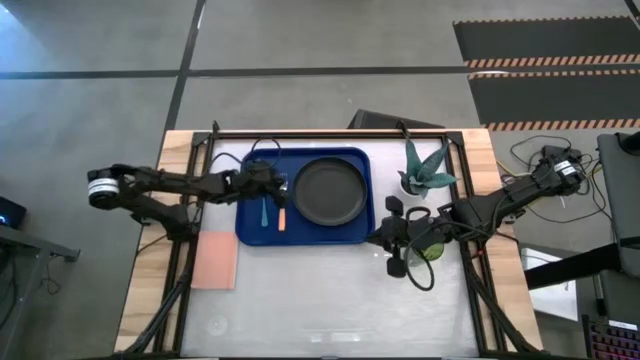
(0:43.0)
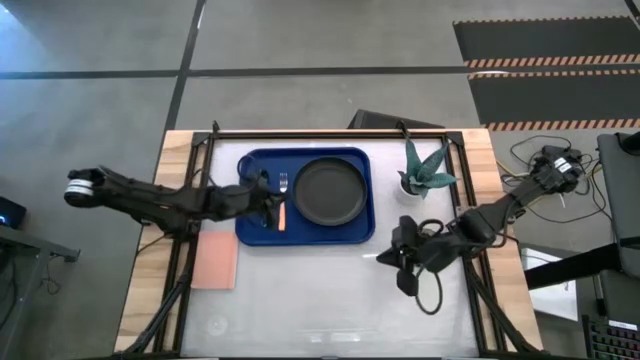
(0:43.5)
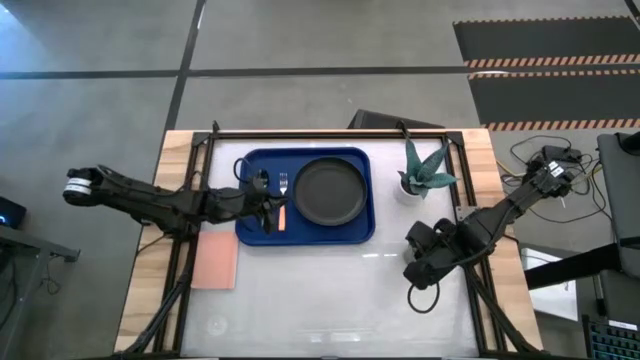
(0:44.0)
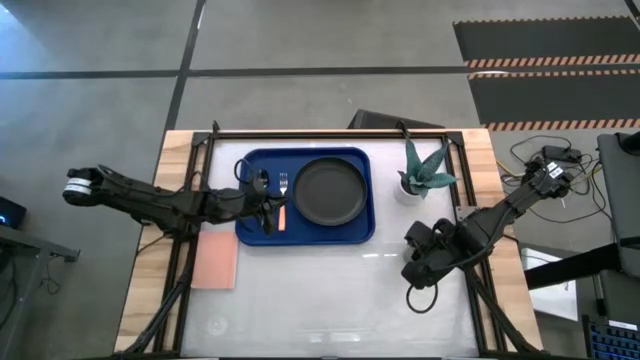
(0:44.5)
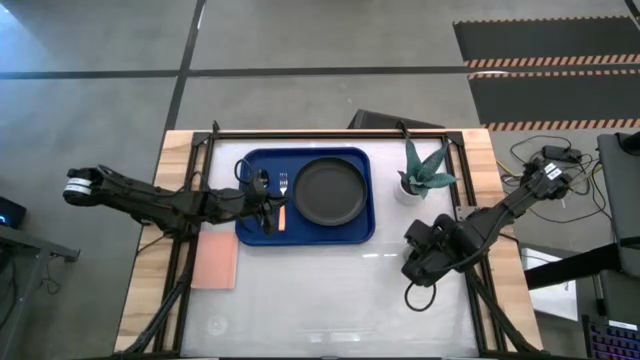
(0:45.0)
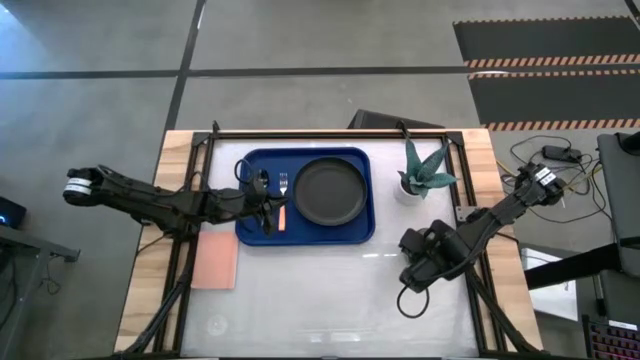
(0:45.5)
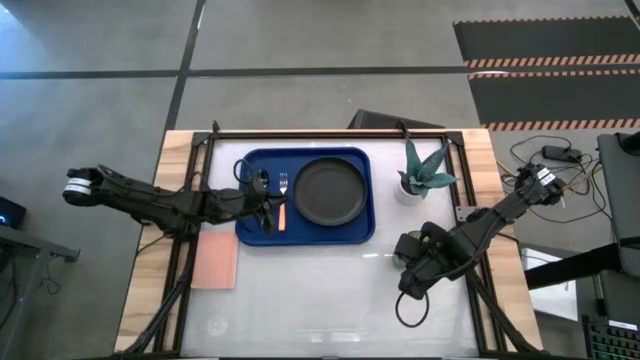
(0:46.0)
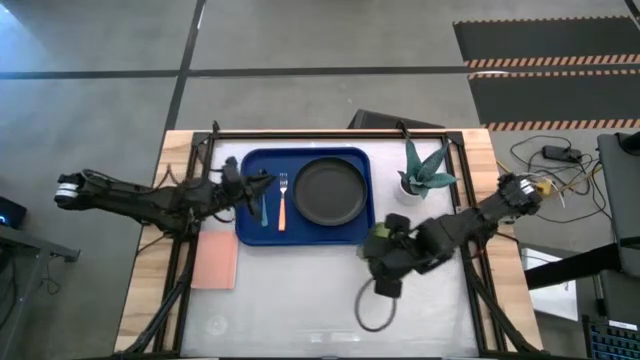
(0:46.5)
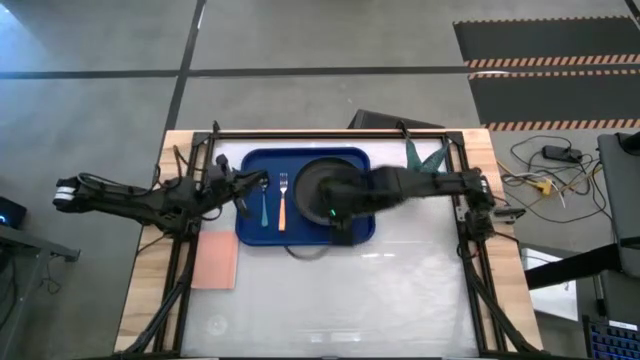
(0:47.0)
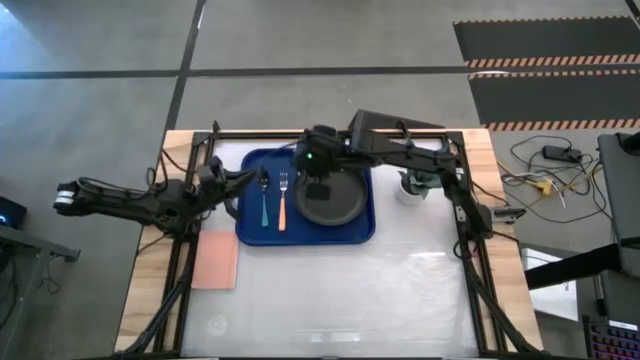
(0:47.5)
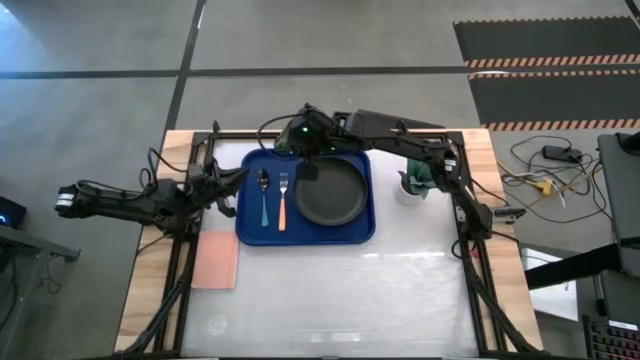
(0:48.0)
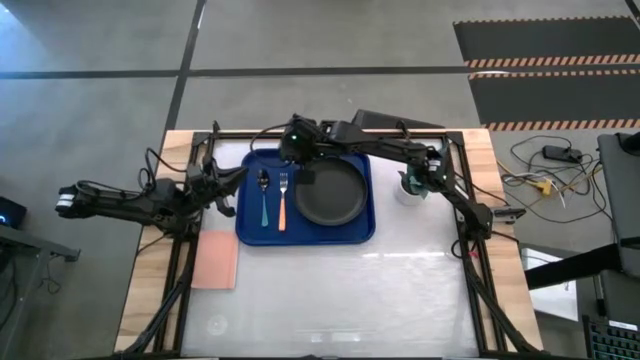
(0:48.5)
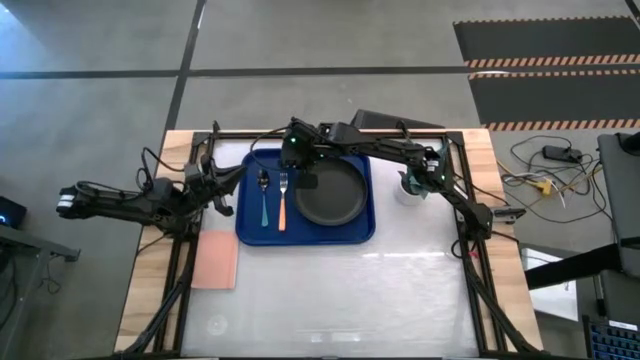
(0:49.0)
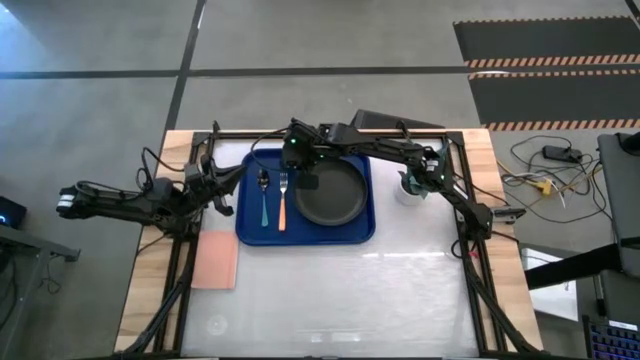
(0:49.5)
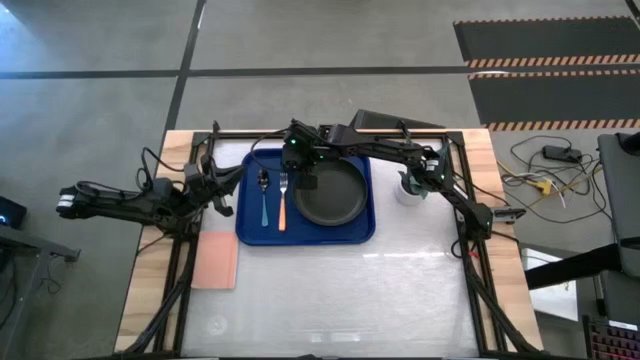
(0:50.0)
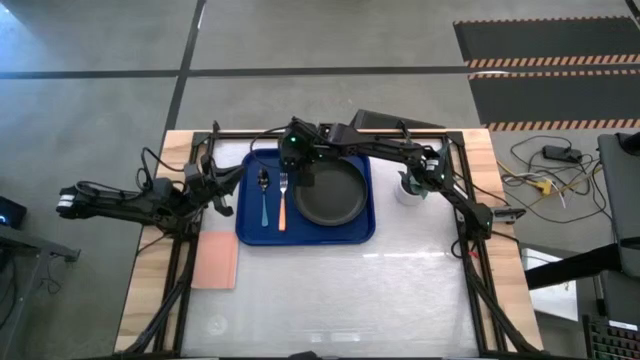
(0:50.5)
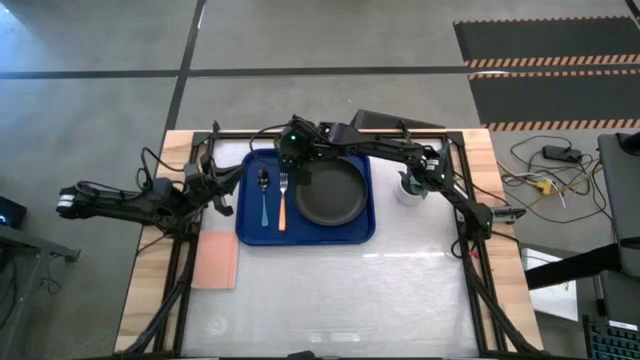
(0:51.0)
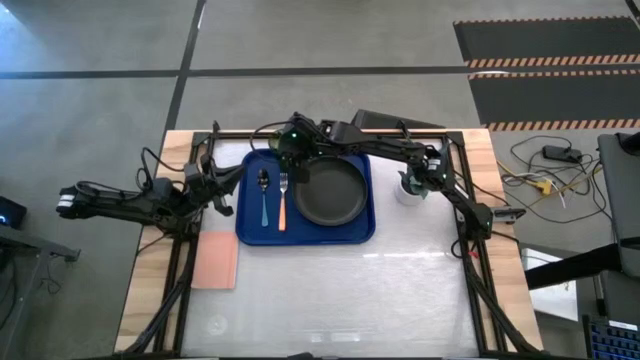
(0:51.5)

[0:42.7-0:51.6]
Task: Pick and place plate/cup/fork/spoon on tray
Put the green cup on the blue serving tray to the top left of the black plate

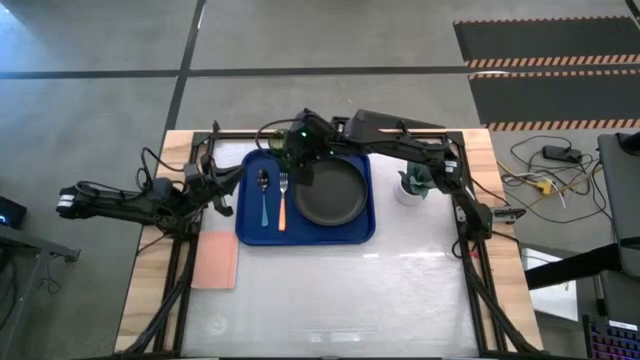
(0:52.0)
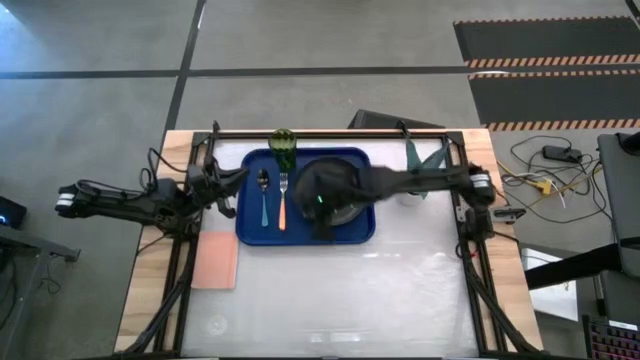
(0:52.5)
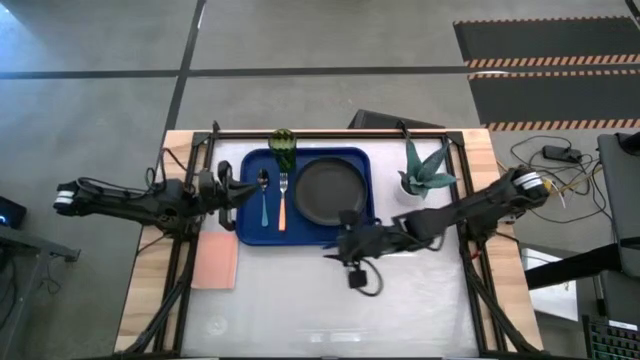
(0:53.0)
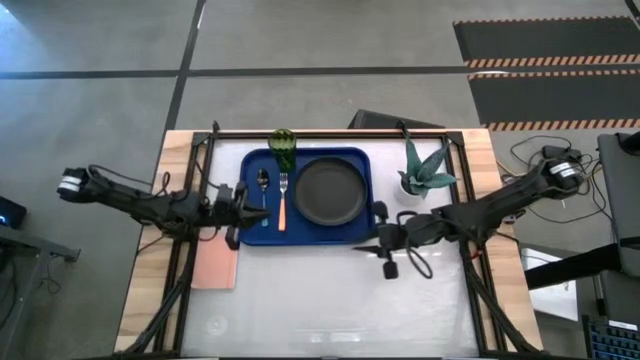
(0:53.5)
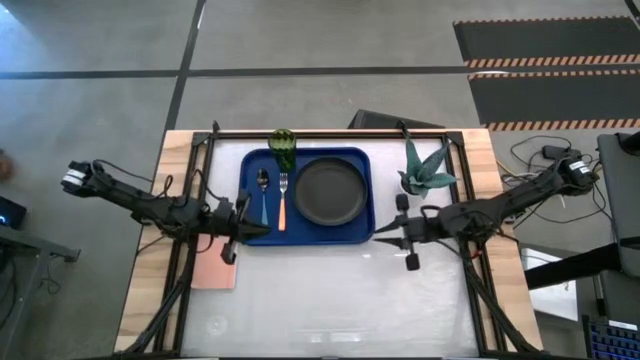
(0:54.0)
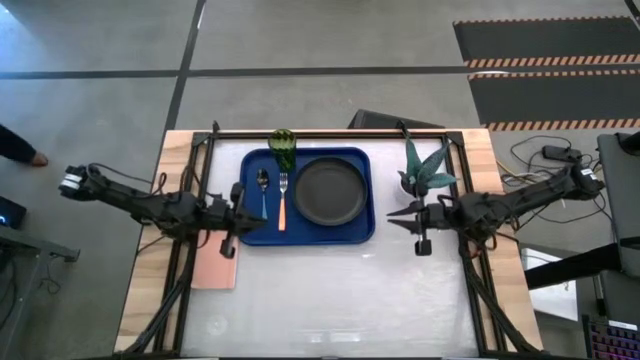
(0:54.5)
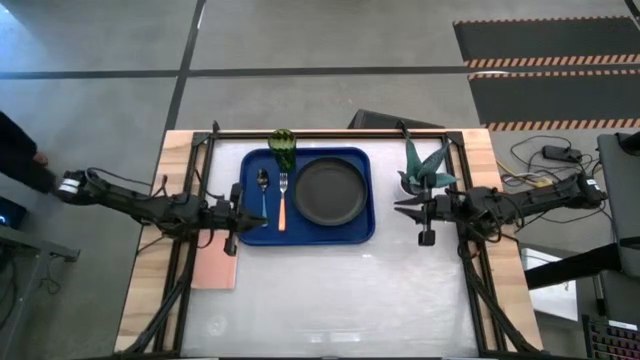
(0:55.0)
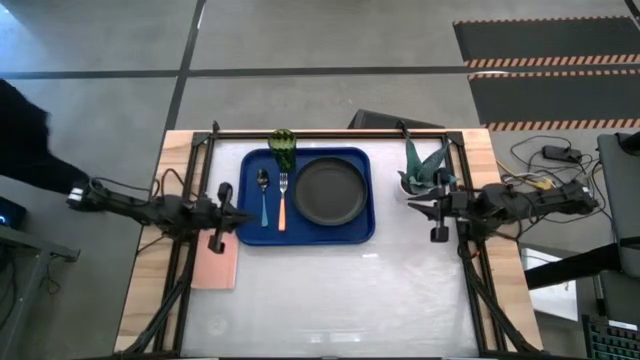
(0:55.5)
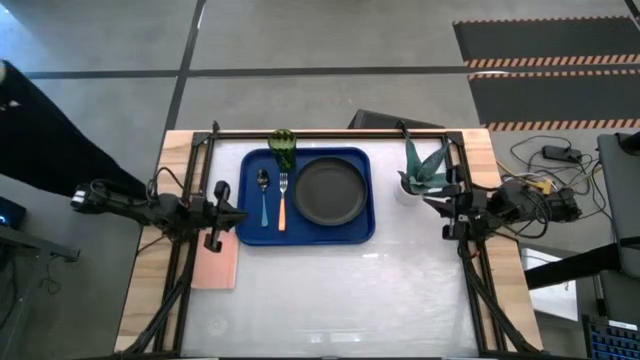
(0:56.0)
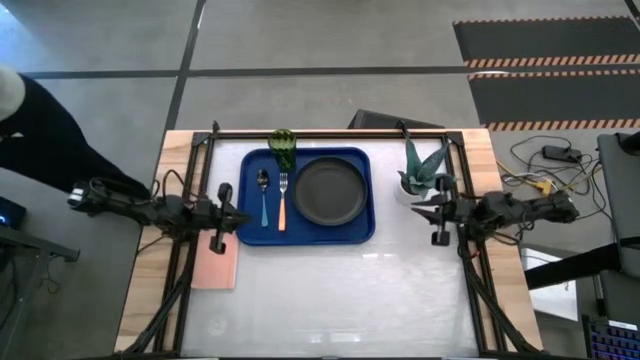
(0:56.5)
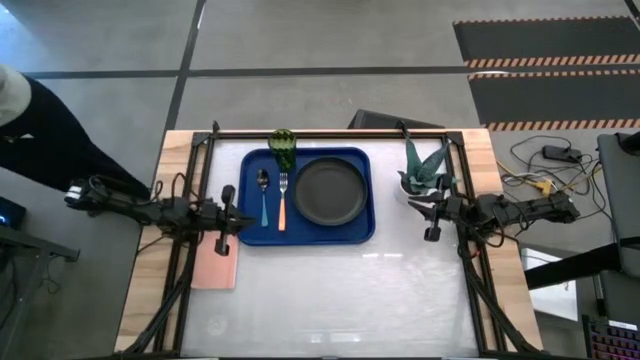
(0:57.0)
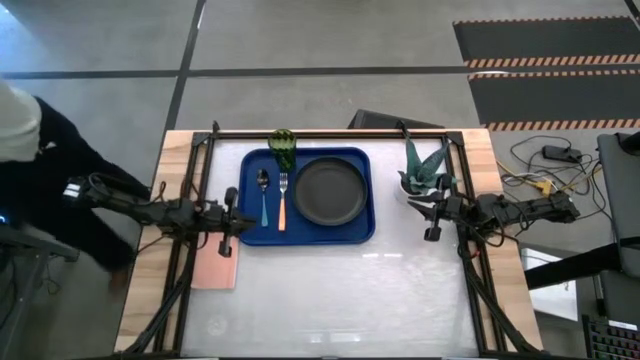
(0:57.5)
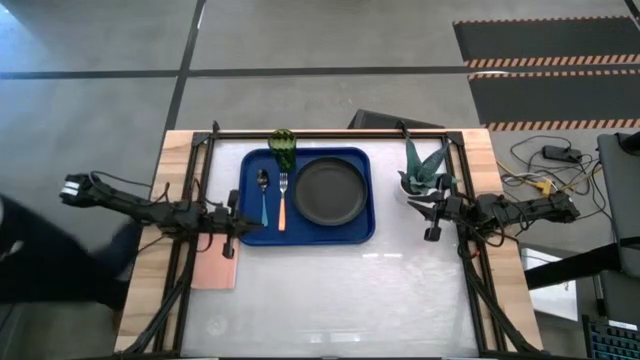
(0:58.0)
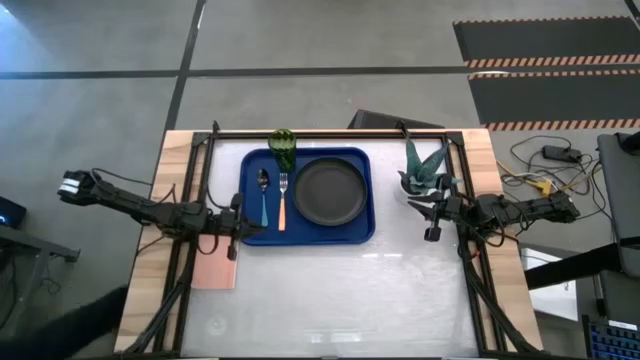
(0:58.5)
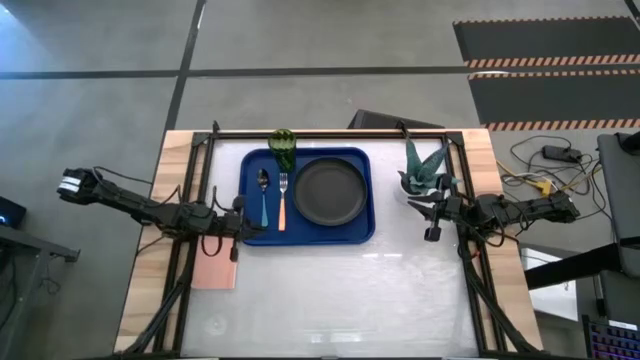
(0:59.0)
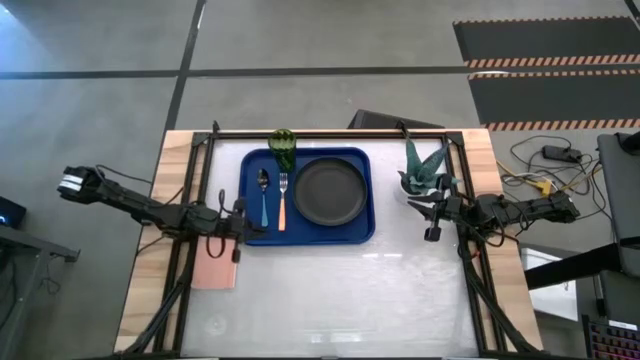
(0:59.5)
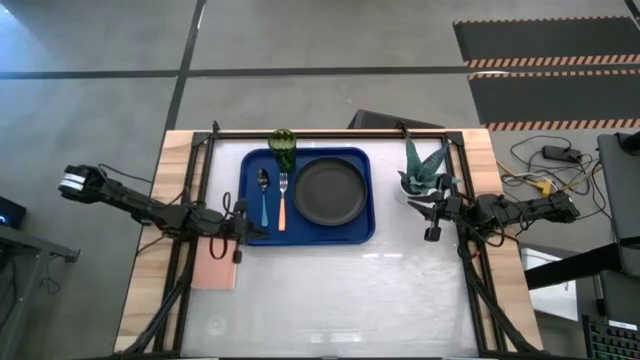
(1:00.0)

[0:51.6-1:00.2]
Return to Home Position

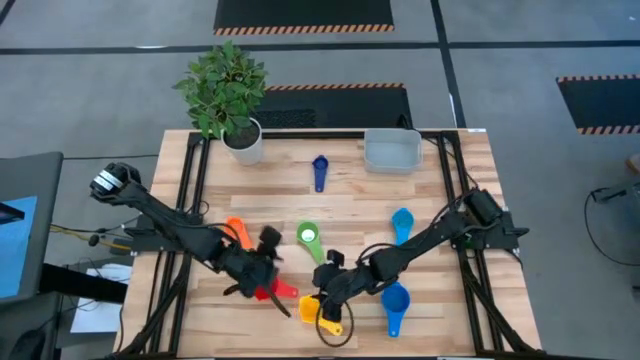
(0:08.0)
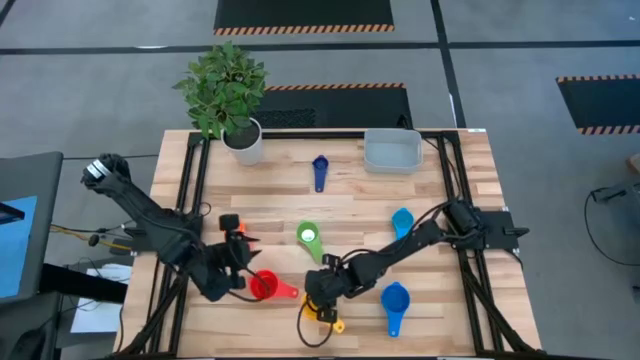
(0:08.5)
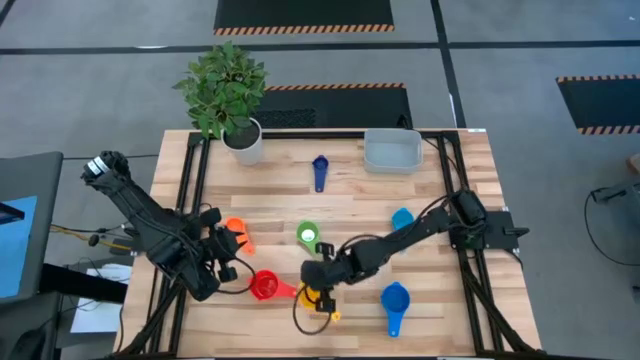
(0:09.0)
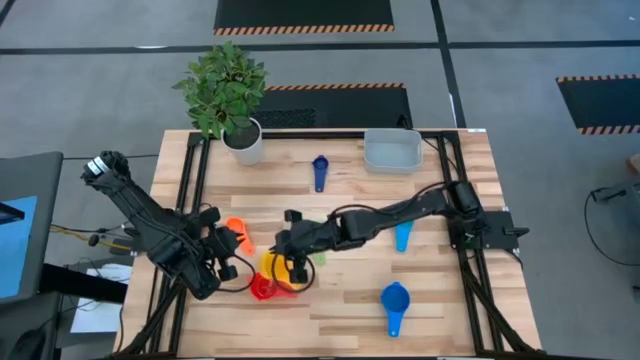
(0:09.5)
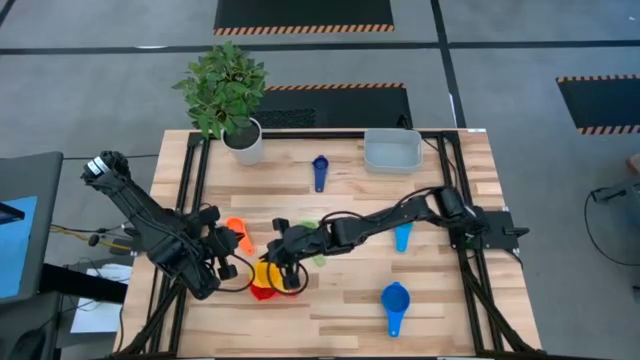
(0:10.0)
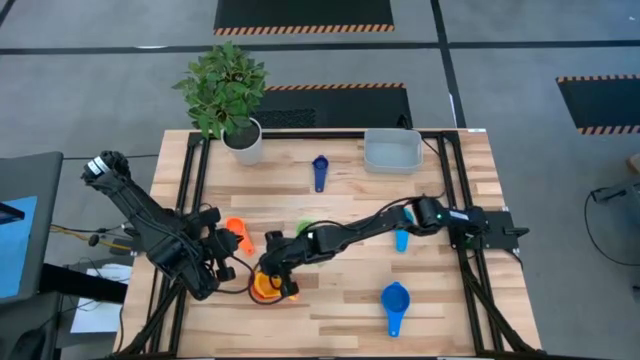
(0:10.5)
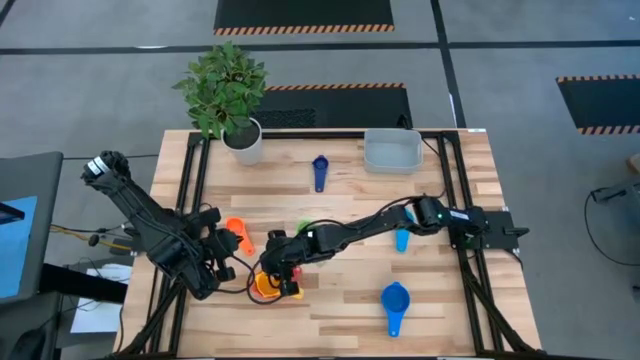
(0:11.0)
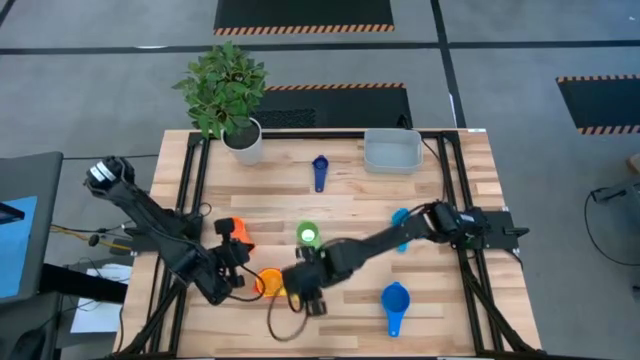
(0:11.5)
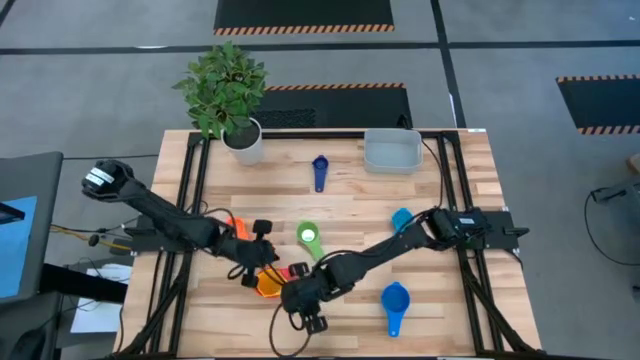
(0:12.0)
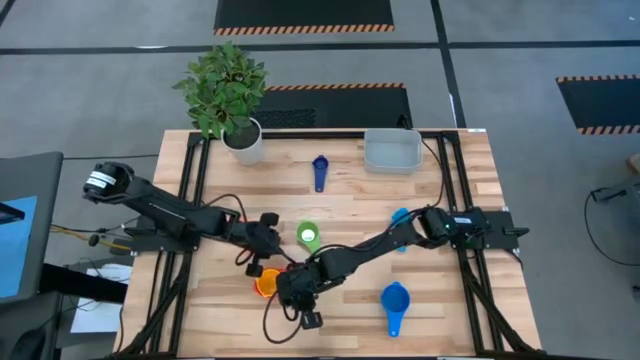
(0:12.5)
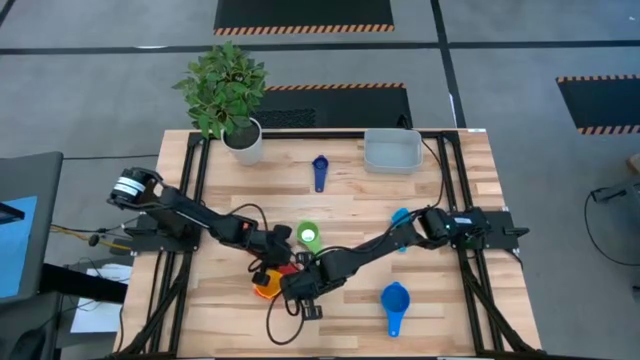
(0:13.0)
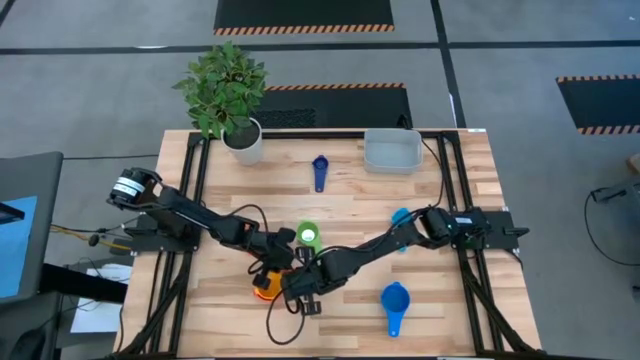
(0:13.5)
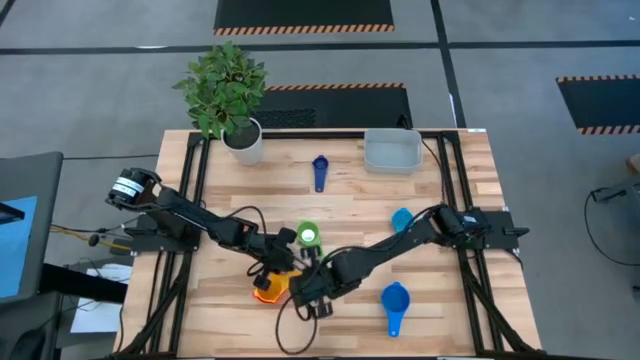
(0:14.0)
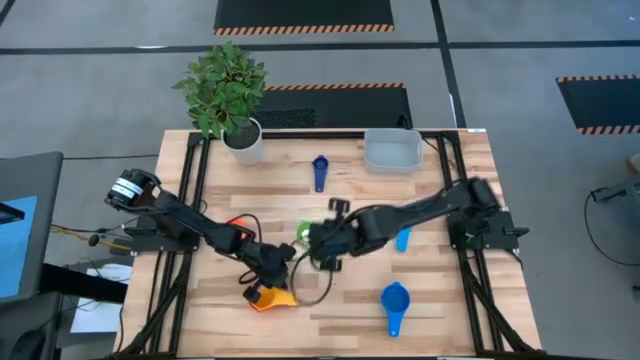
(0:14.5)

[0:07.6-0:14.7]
Task: Nest measuring cups in basket
Stack the yellow measuring cup on top of the red measuring cup
